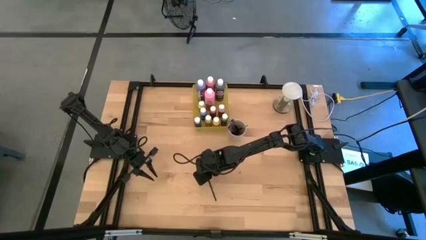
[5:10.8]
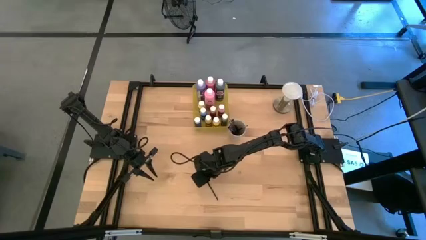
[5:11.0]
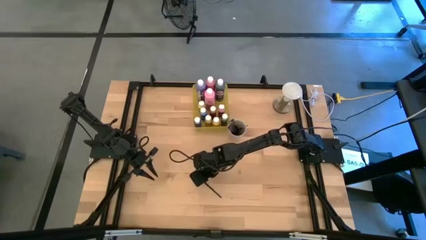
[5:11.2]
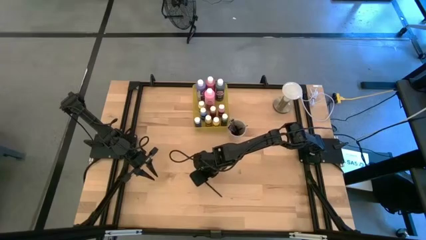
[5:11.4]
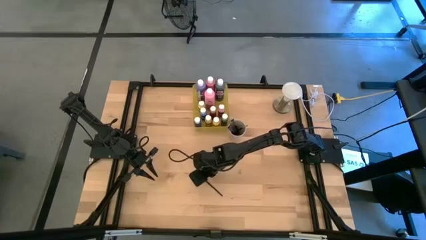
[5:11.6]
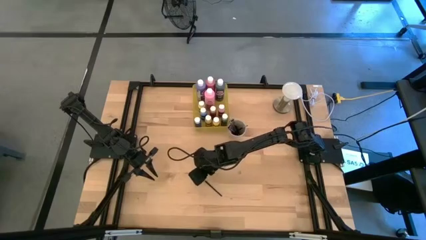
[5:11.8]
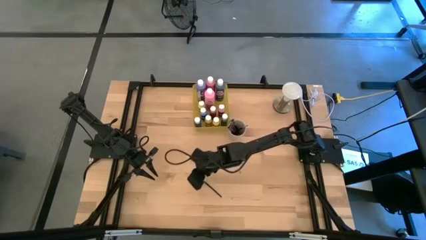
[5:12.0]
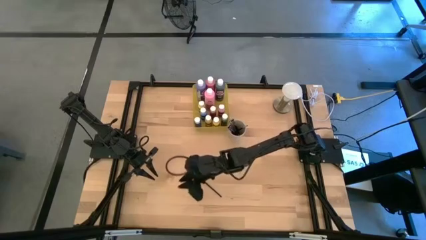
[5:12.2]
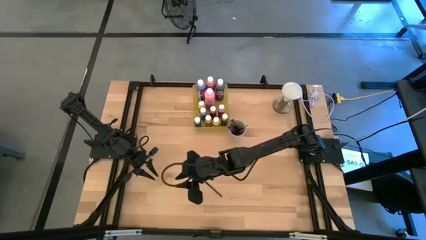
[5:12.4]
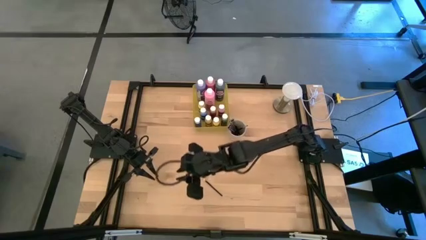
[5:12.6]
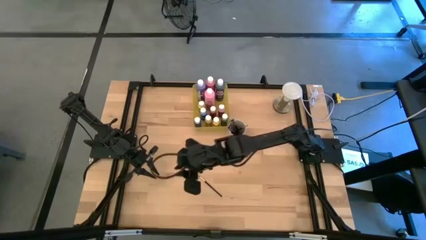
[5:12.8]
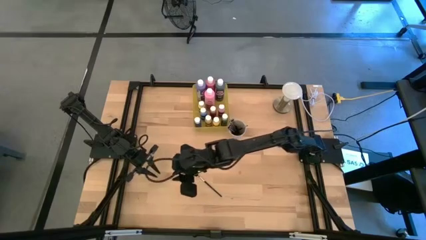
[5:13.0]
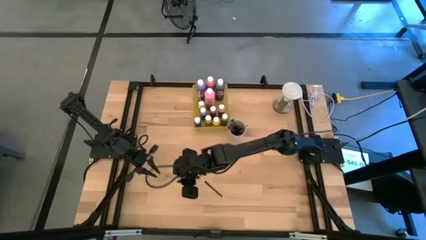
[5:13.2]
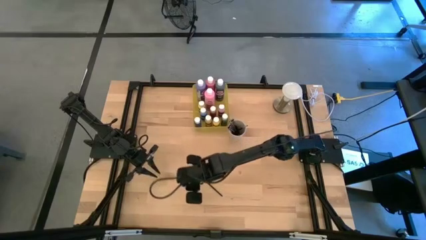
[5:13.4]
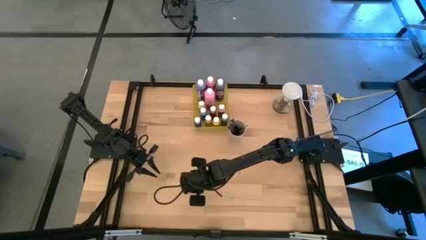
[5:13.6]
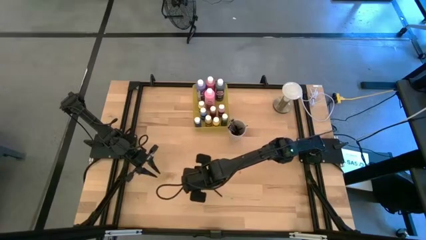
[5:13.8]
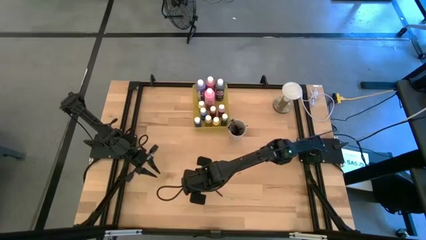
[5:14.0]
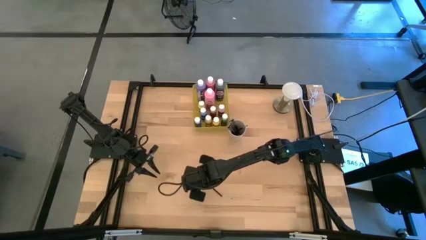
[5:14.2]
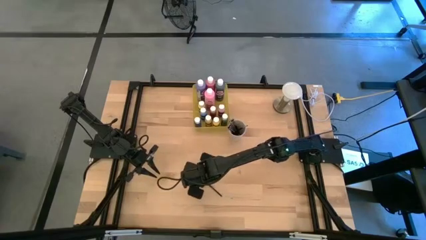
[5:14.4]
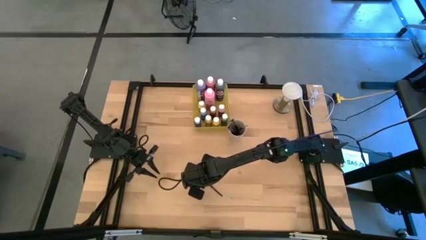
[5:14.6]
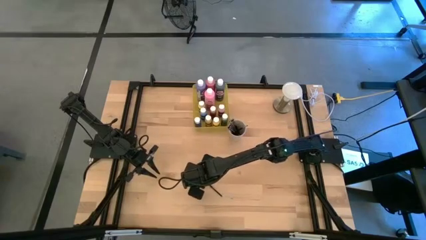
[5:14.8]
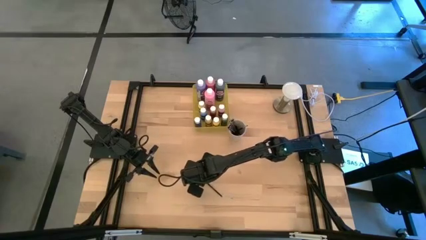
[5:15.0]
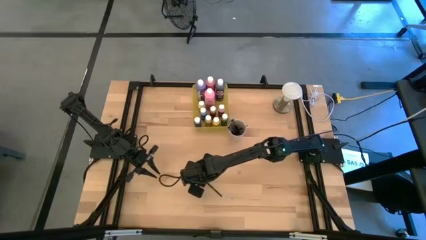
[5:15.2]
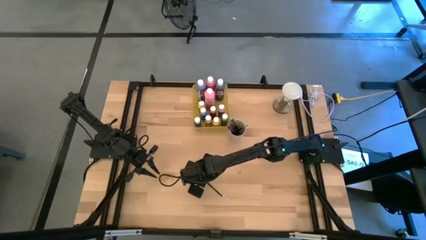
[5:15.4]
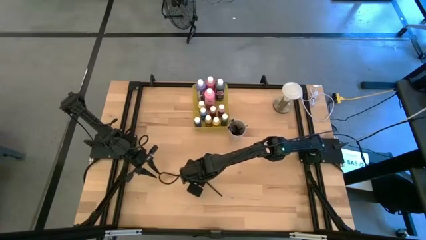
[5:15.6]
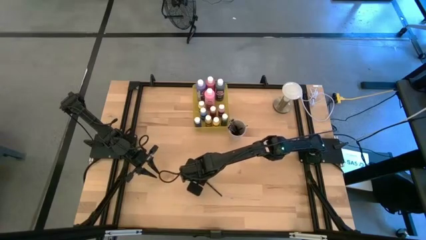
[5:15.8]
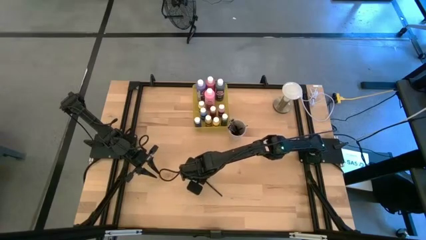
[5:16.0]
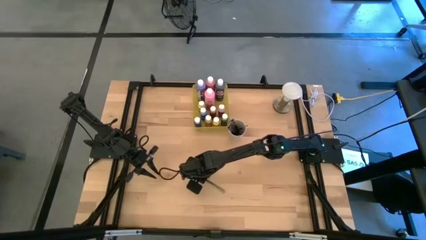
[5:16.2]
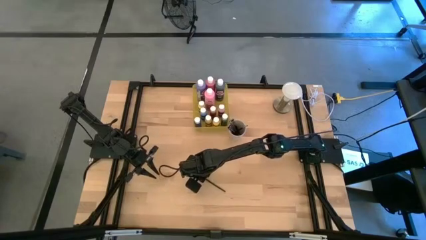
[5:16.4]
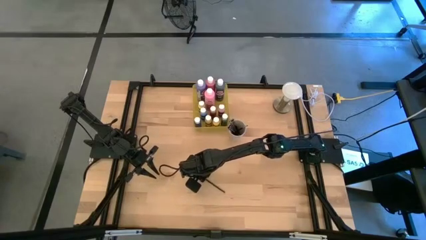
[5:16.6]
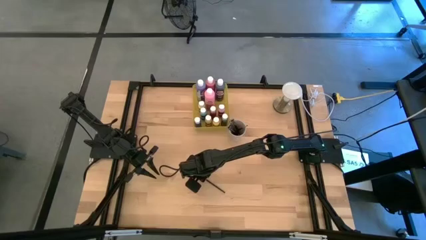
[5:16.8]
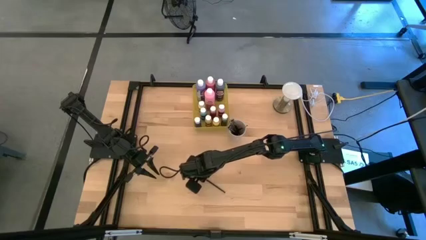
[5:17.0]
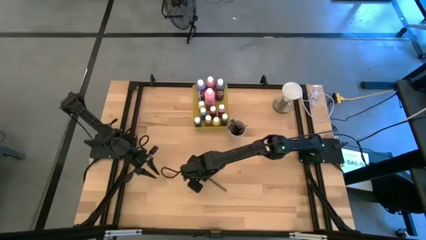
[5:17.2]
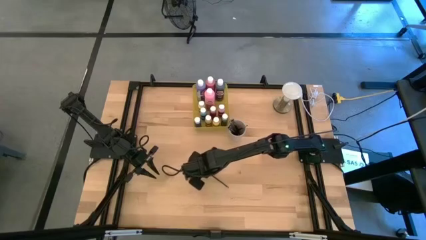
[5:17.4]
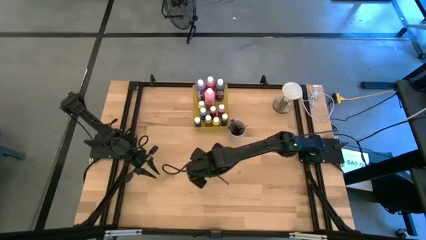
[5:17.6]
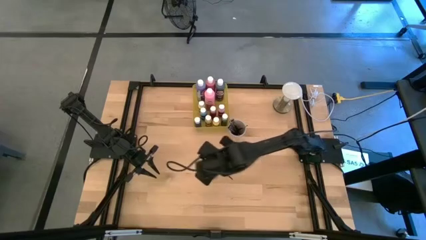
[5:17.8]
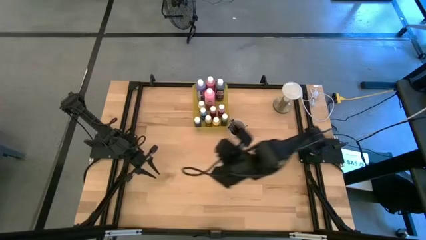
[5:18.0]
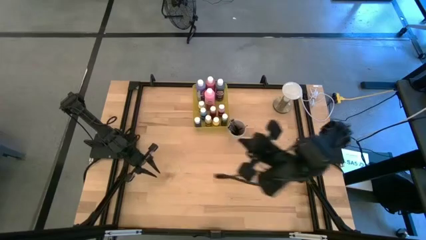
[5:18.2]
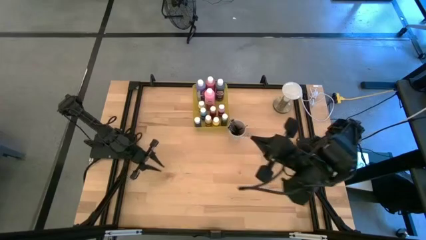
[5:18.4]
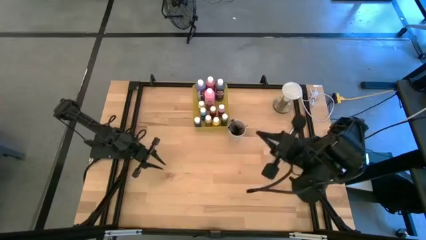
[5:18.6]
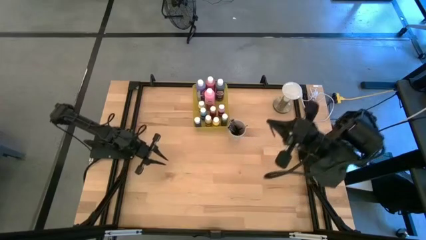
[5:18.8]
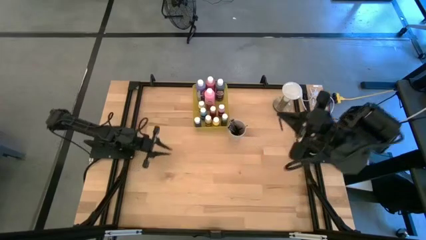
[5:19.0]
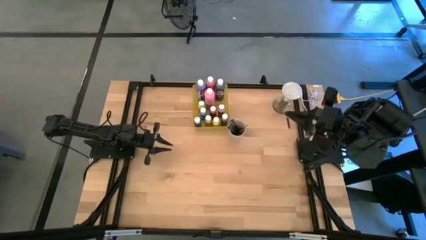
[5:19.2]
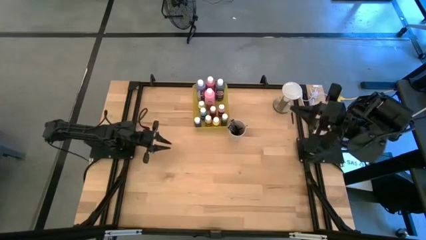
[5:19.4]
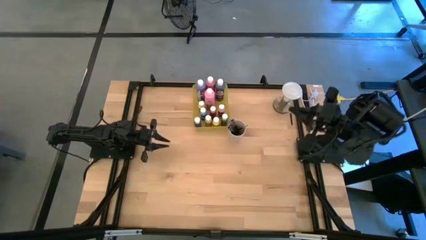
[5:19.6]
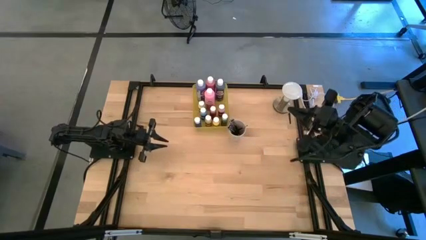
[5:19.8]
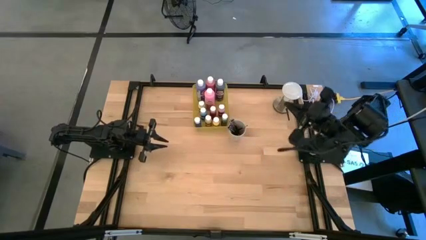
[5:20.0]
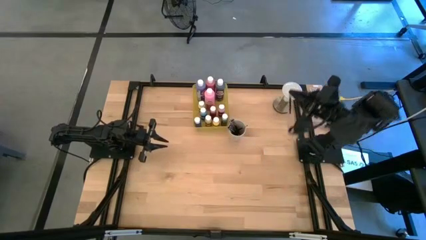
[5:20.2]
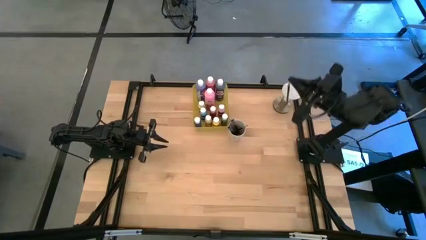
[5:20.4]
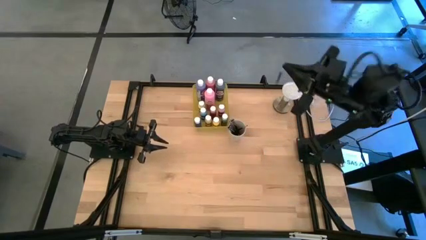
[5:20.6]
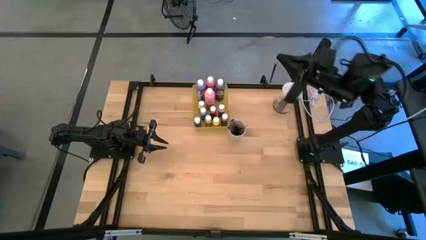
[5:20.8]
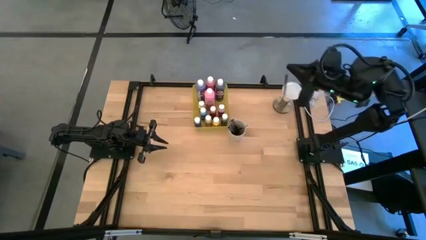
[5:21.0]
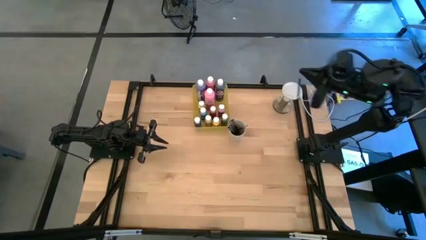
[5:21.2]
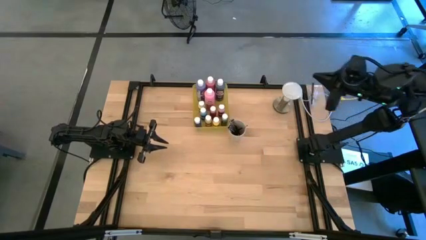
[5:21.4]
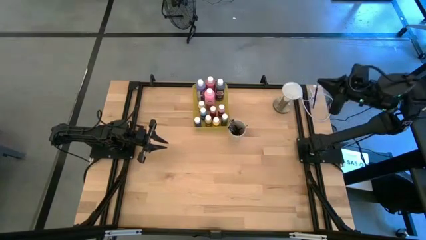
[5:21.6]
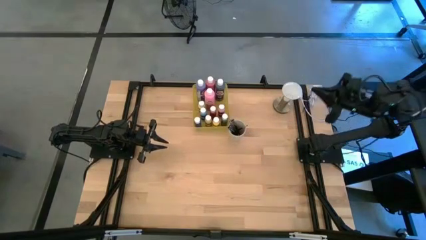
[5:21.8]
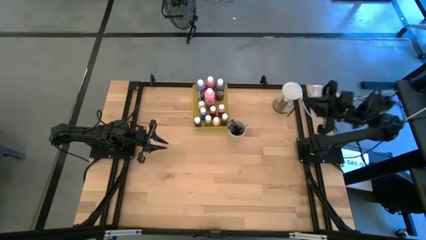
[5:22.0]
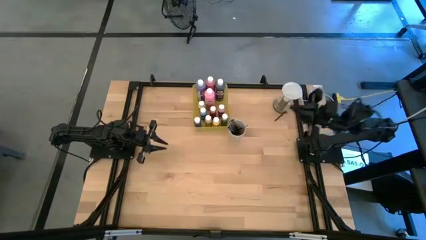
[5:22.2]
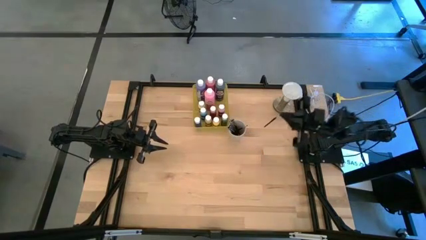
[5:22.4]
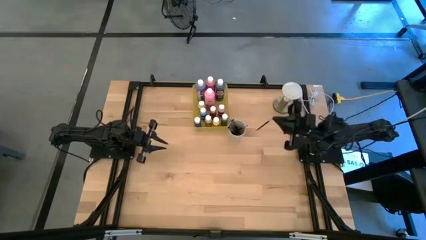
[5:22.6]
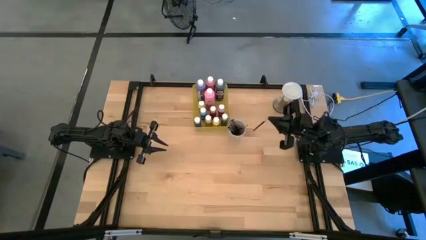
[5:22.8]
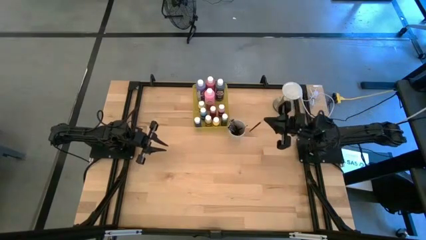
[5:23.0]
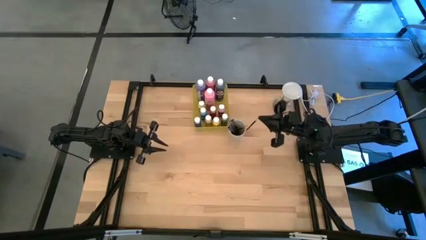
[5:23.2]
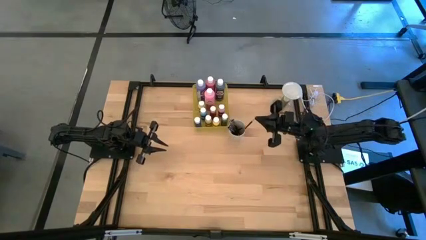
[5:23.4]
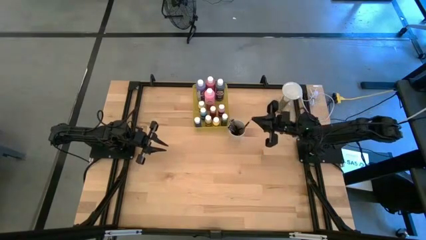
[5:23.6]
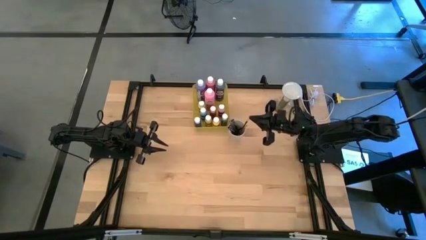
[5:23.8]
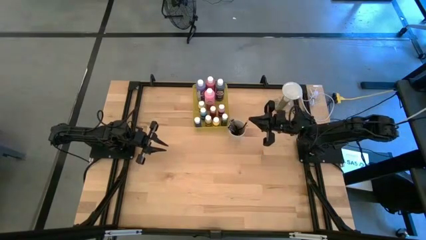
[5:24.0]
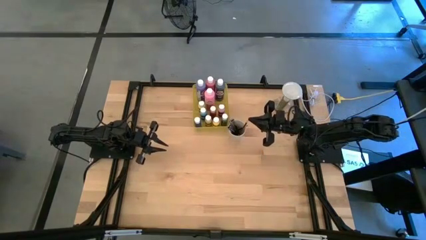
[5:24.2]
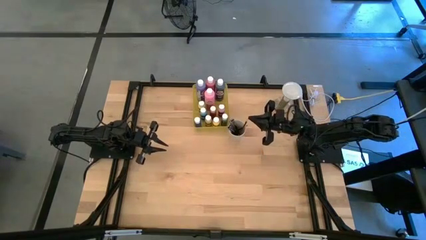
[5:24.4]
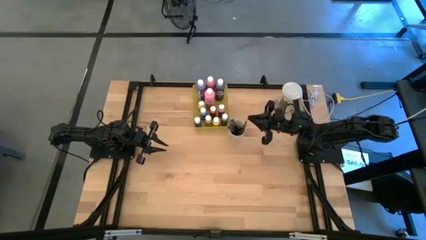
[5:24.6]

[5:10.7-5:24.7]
Task: Pick & Place Paint Supplies
Put the black paintbrush into the white cup

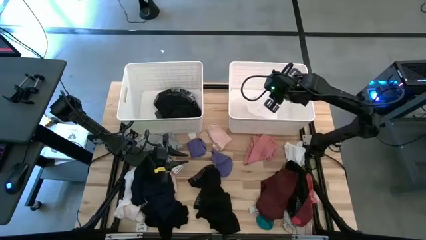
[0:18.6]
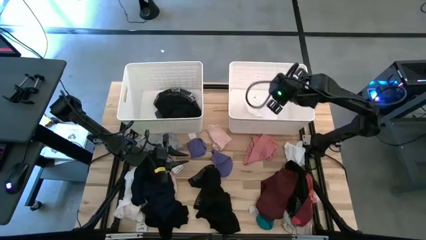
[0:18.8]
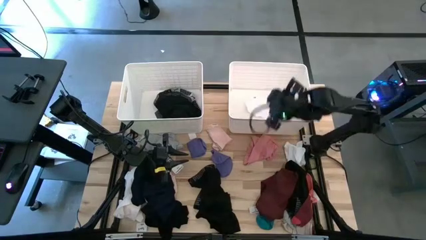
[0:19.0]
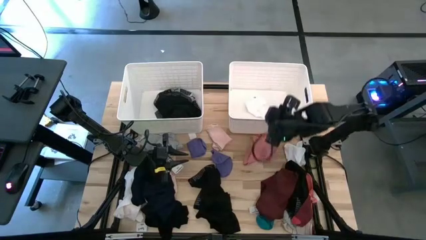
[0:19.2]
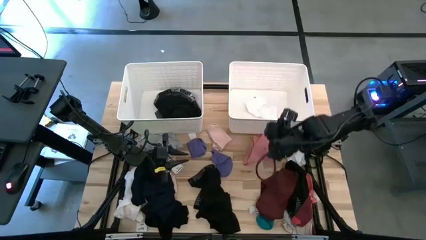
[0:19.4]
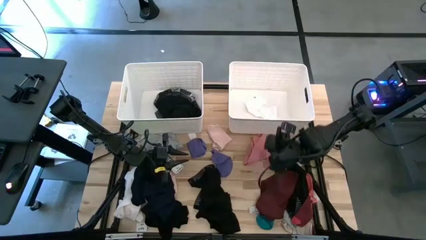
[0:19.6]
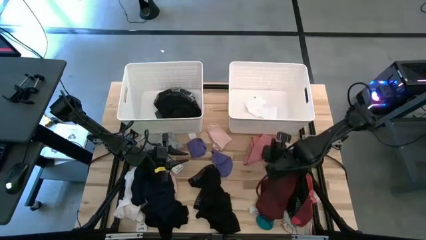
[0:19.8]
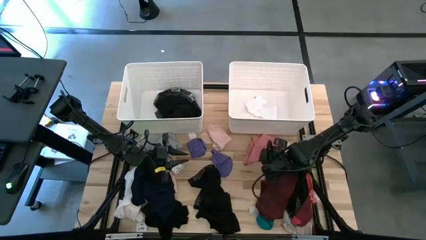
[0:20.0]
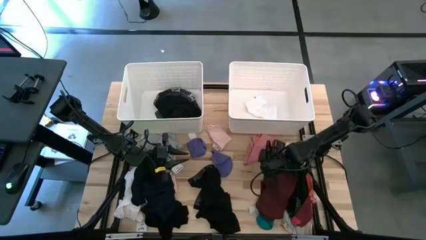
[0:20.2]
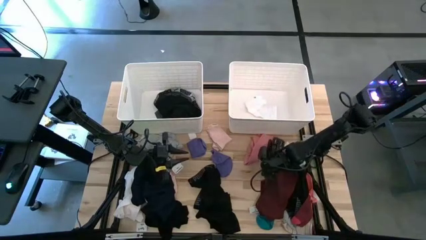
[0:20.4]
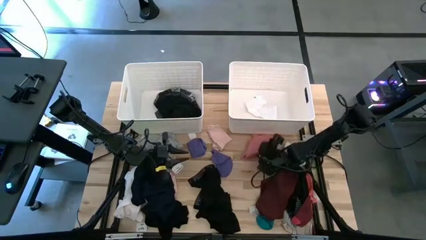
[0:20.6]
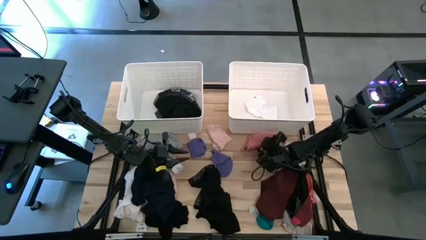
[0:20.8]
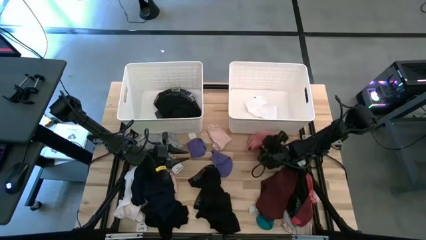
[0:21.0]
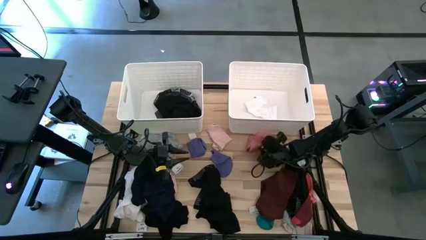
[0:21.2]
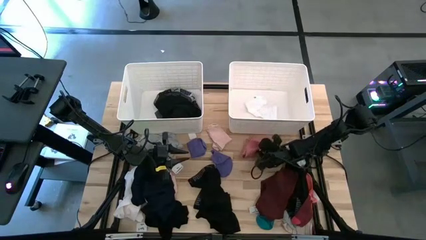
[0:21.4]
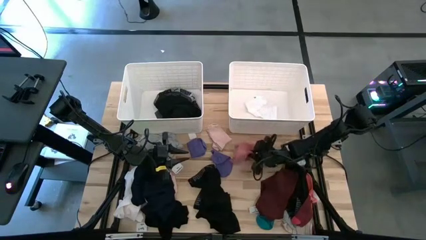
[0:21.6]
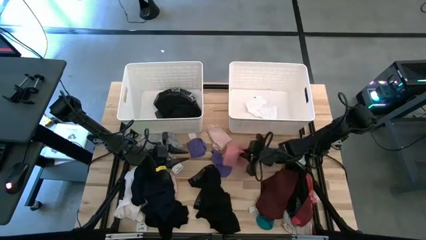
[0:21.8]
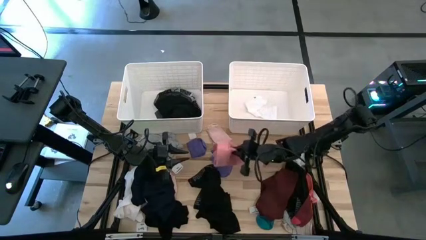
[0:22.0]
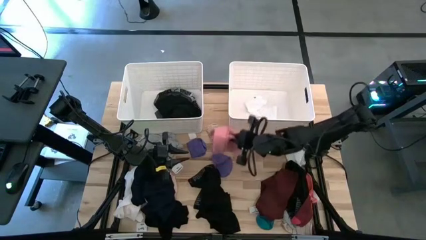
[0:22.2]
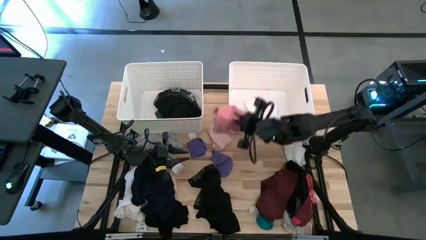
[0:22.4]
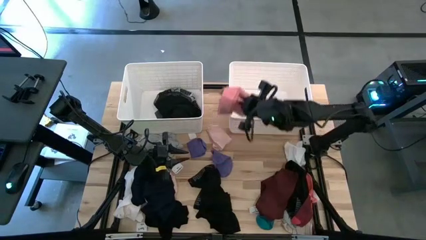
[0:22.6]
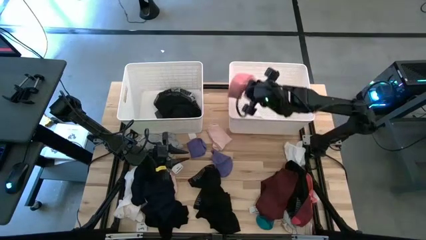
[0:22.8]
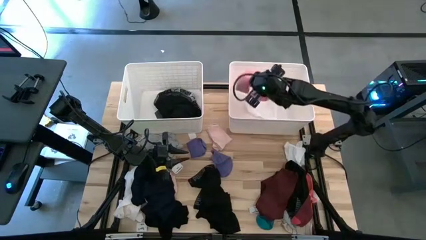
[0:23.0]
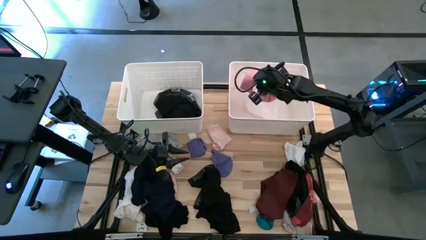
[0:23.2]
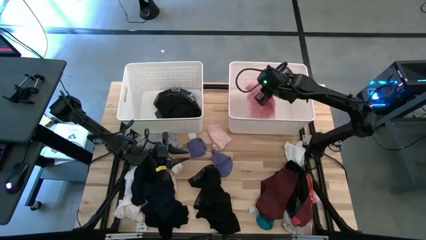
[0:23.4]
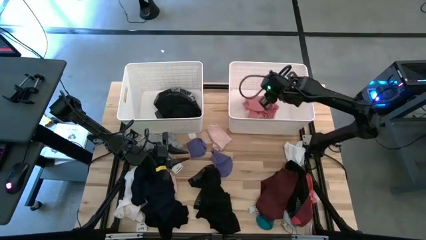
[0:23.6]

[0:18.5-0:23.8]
Task: Sort clothes
Put the pink underwear into the right white laundry bin
